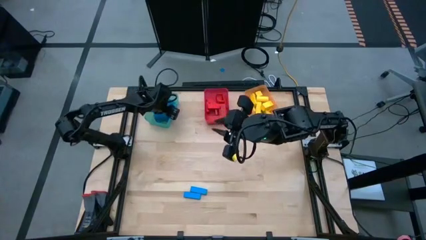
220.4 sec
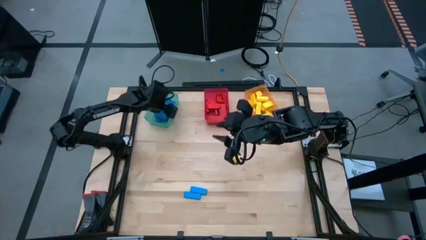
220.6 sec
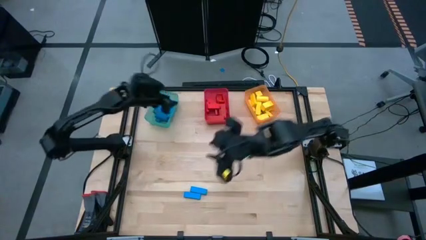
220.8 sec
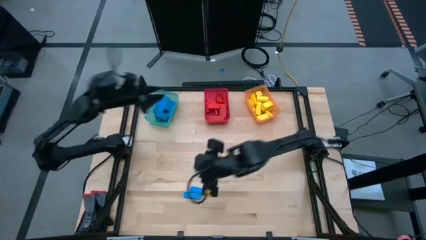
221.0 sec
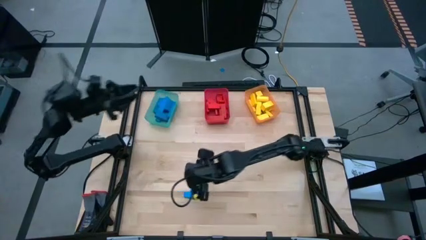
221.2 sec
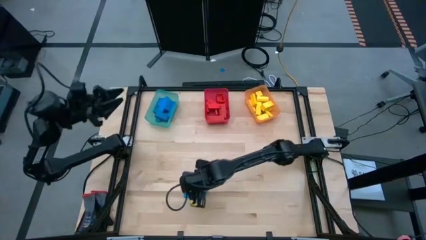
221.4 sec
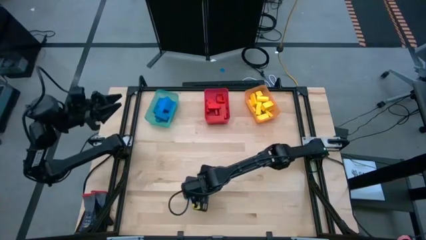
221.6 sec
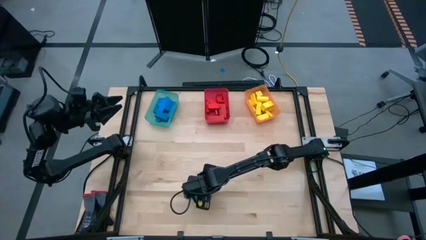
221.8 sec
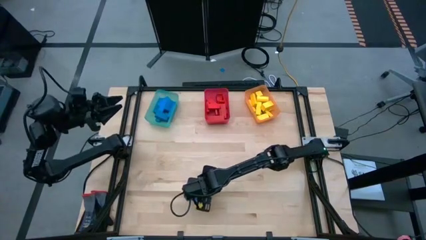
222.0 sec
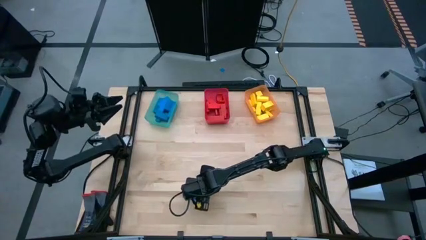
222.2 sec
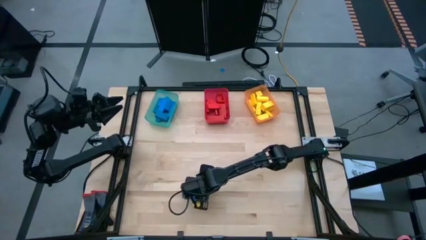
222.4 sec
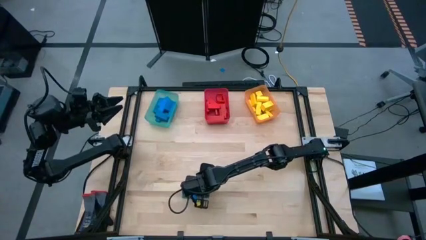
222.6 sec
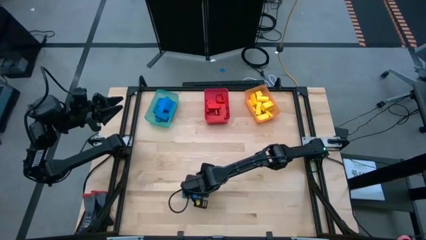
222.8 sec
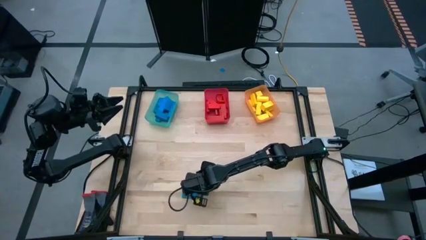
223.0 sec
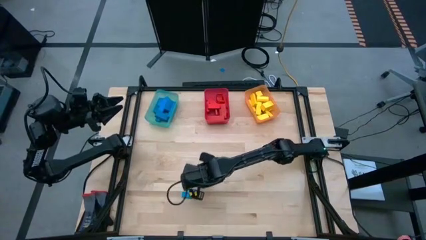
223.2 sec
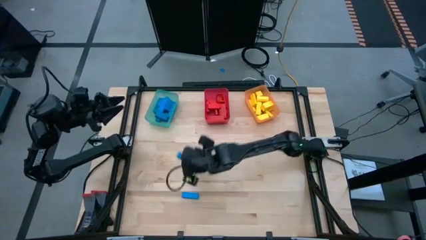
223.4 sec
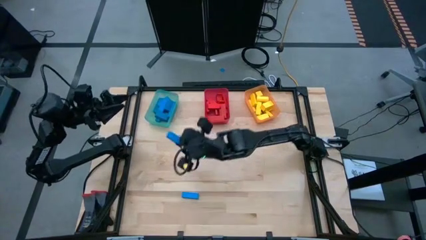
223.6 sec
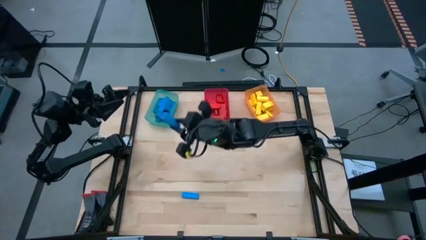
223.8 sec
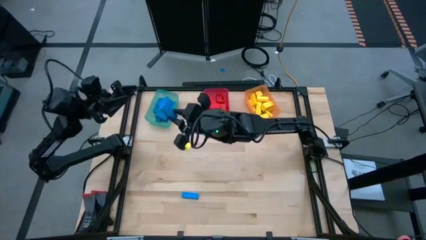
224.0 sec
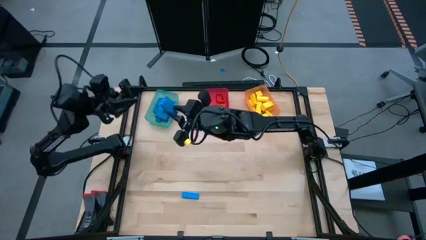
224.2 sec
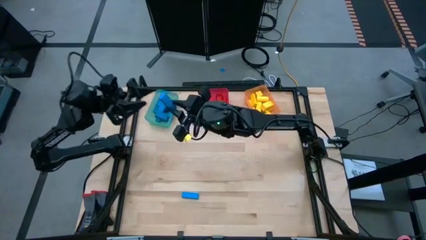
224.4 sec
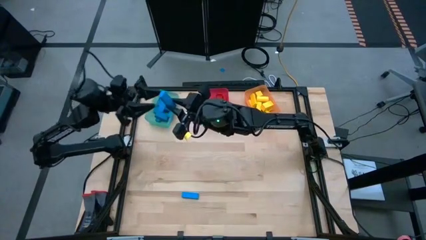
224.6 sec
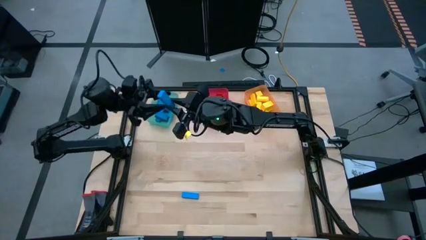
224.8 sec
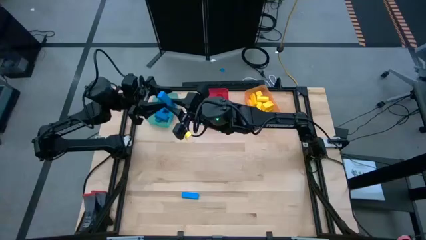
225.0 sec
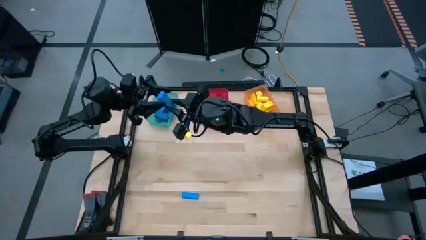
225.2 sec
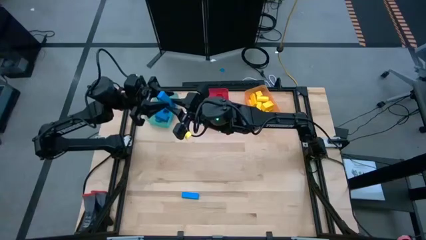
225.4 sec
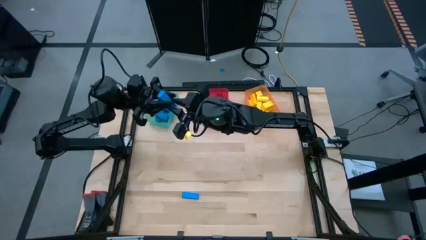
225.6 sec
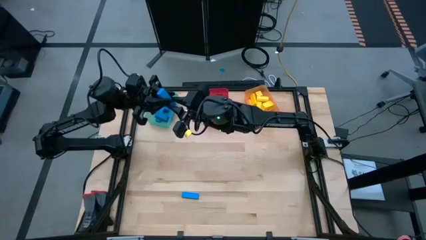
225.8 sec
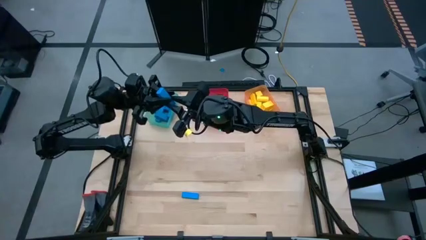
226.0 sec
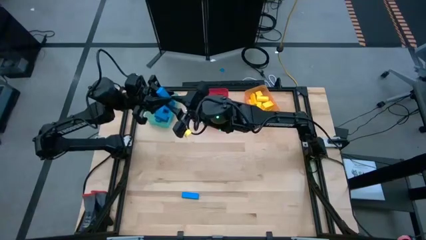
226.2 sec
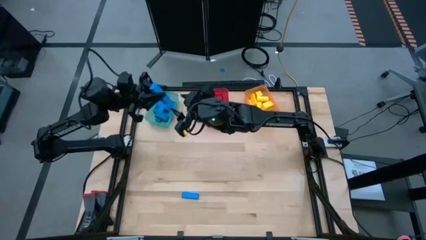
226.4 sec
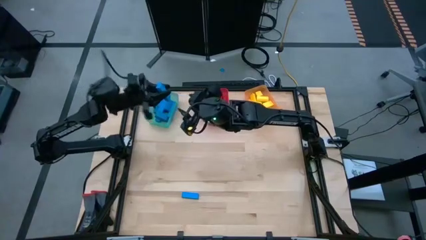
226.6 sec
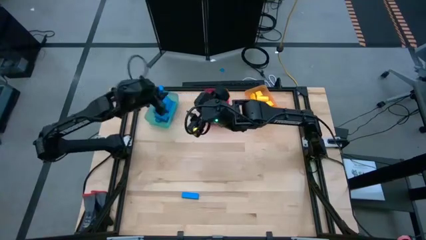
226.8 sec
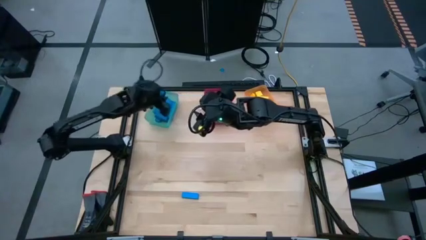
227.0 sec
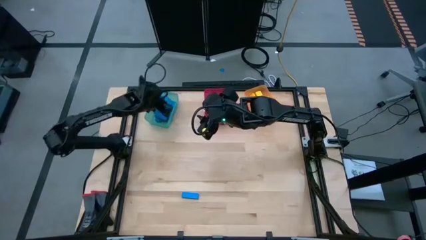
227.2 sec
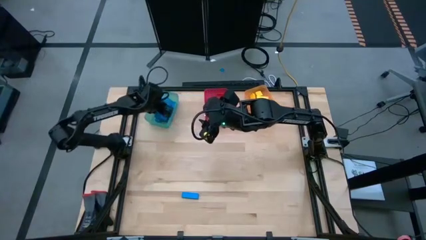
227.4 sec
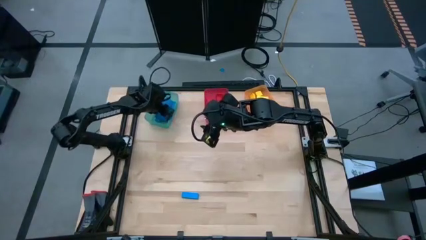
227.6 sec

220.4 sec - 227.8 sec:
Task: Sort blocks
Put the blue block into the blue bin

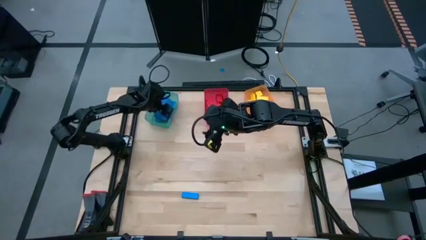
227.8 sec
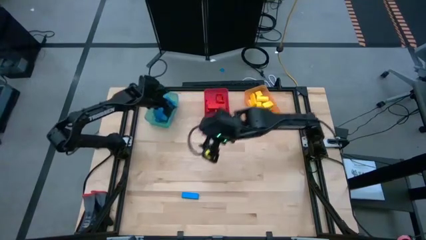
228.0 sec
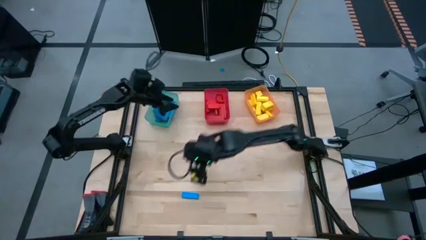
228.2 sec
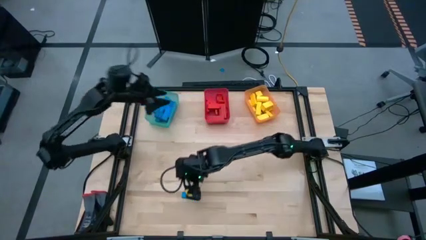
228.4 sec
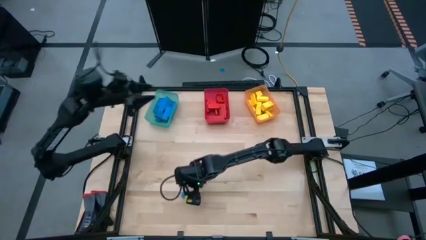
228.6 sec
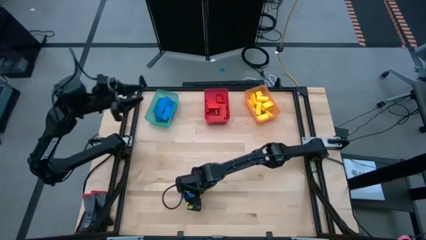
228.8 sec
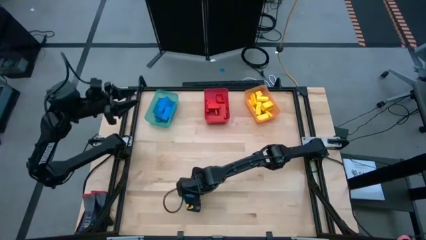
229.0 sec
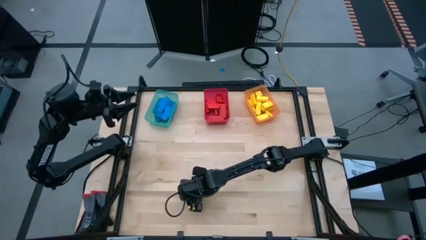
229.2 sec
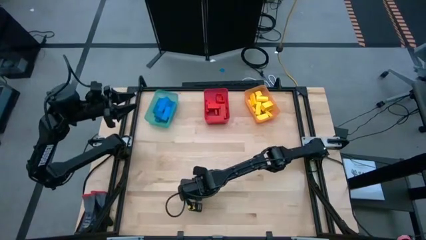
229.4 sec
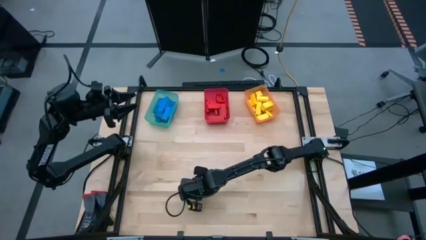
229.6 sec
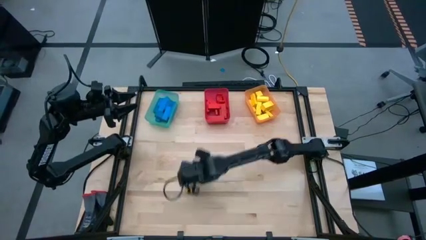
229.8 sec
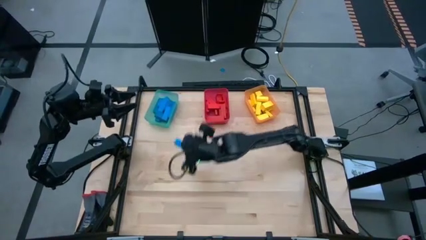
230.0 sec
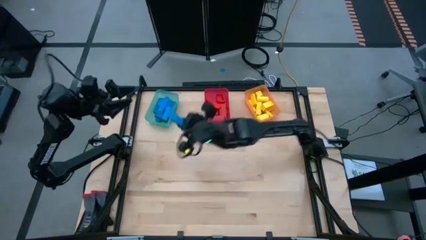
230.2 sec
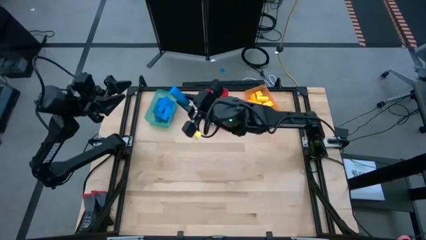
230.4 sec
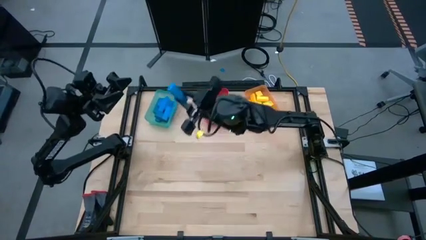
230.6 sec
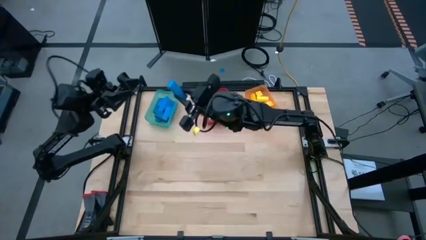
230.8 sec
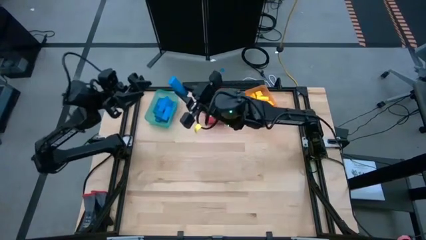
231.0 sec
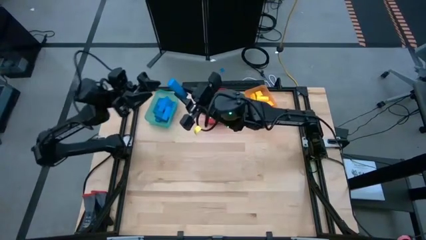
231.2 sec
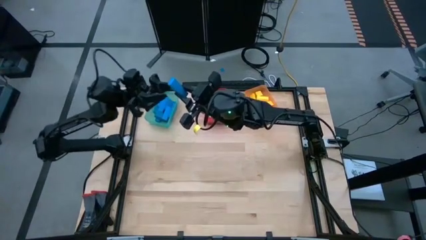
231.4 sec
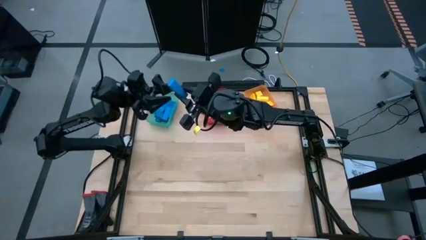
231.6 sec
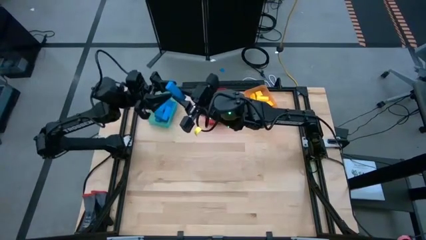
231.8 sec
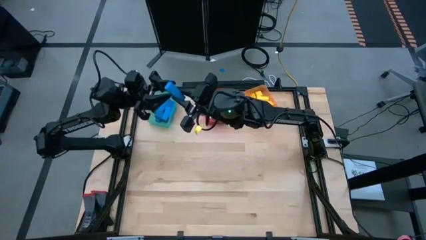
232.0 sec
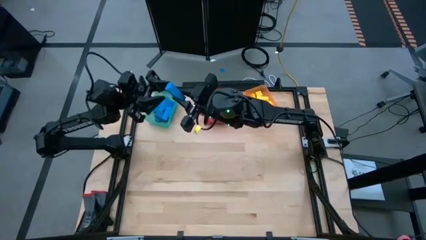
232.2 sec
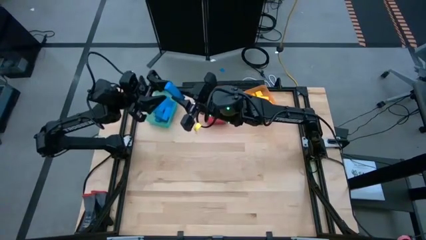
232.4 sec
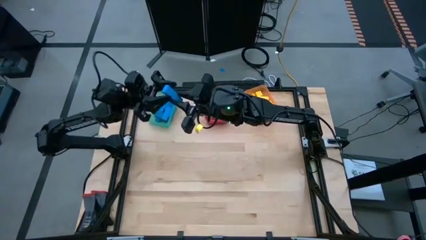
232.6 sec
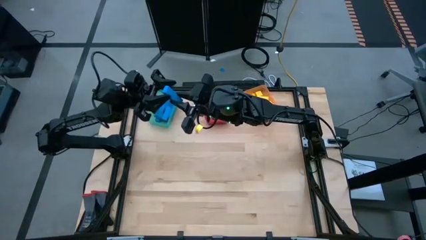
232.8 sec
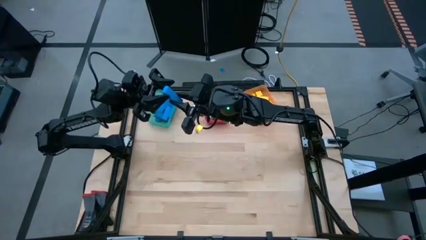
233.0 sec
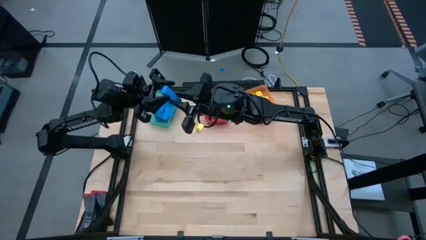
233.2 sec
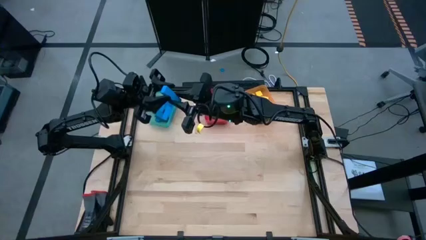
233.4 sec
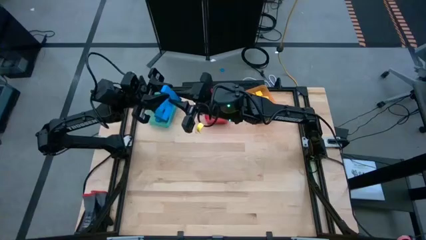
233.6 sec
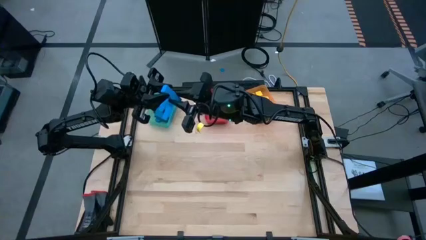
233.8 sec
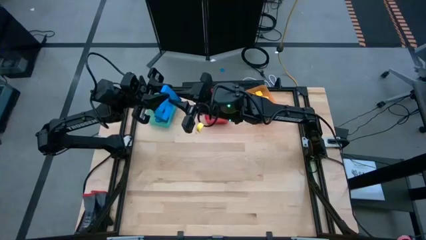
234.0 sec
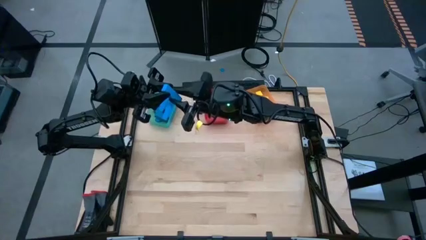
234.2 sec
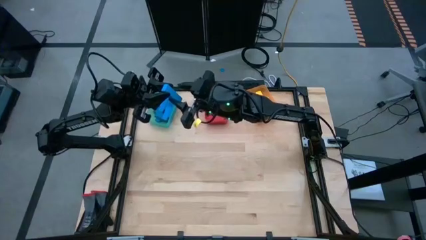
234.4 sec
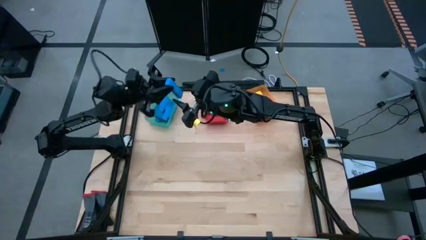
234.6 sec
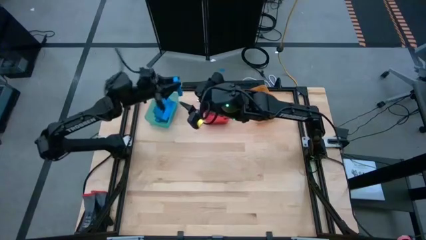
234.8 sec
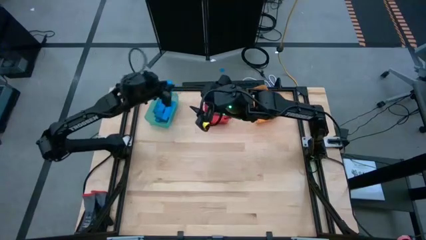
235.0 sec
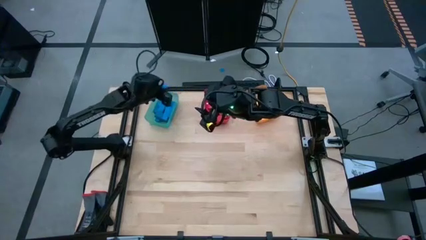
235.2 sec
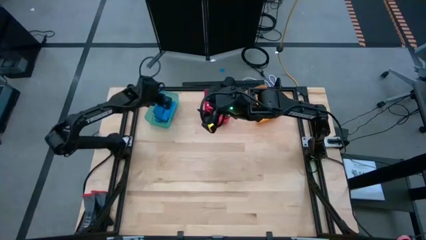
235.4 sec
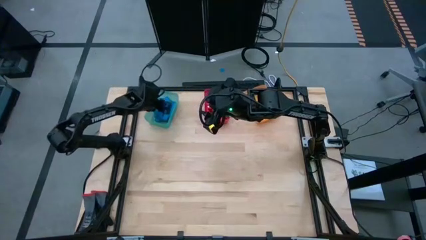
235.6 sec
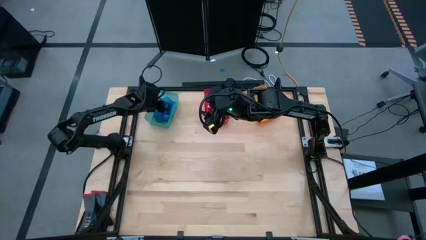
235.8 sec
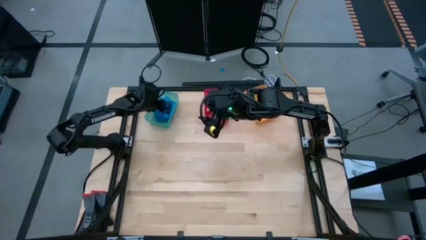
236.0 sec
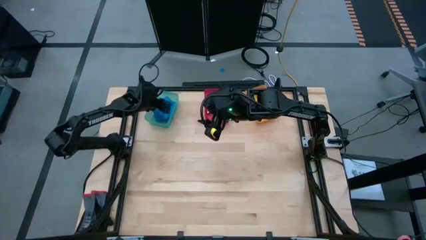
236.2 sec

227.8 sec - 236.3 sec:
Put the blue block into the blue bin
